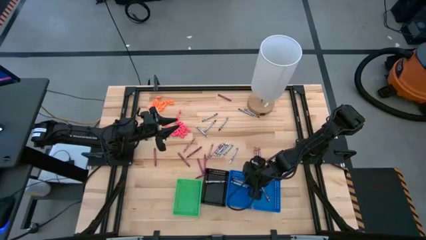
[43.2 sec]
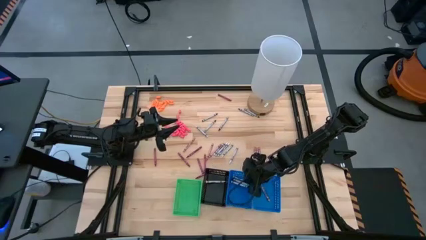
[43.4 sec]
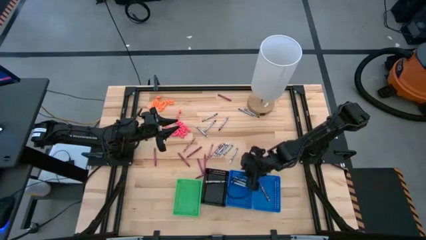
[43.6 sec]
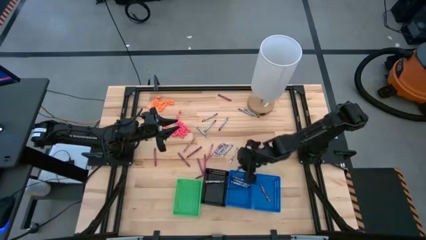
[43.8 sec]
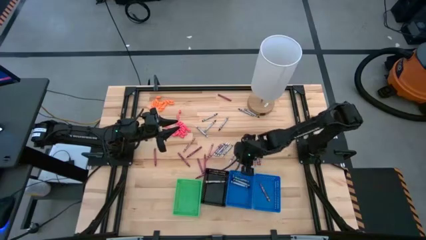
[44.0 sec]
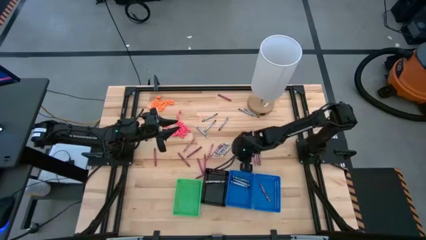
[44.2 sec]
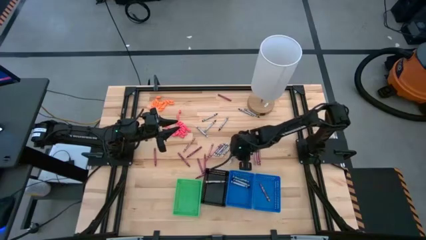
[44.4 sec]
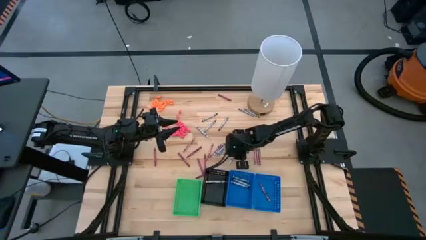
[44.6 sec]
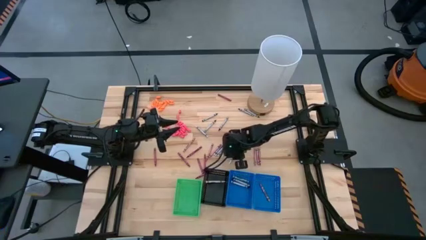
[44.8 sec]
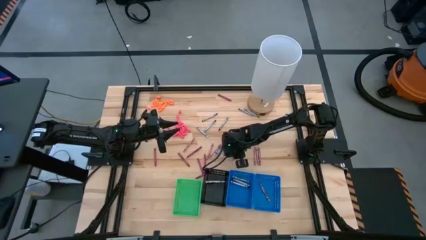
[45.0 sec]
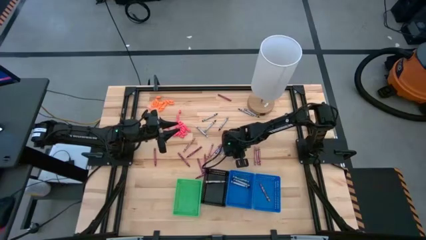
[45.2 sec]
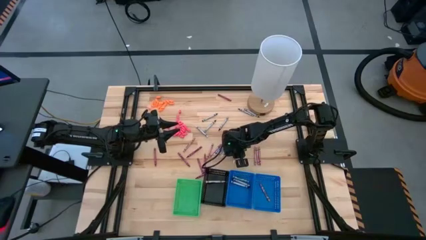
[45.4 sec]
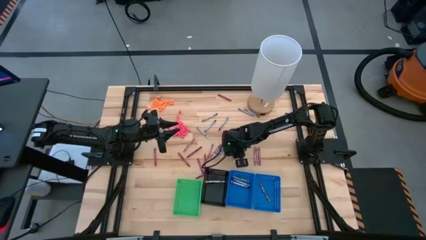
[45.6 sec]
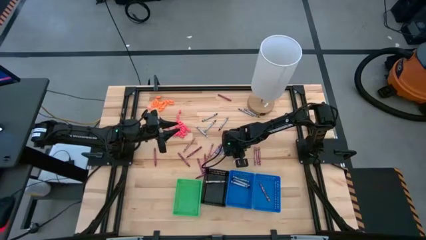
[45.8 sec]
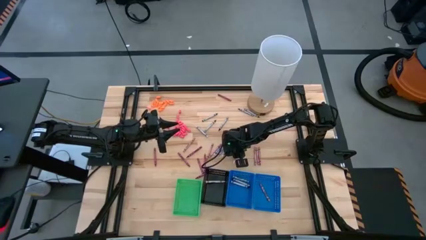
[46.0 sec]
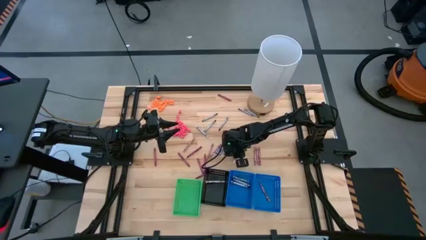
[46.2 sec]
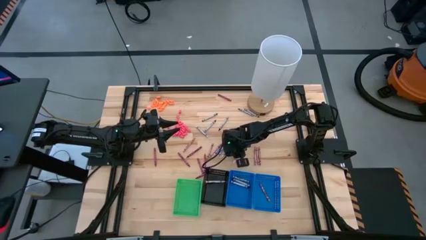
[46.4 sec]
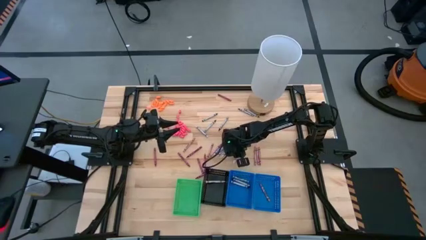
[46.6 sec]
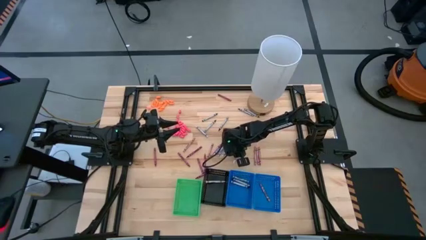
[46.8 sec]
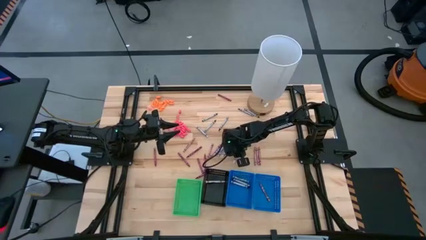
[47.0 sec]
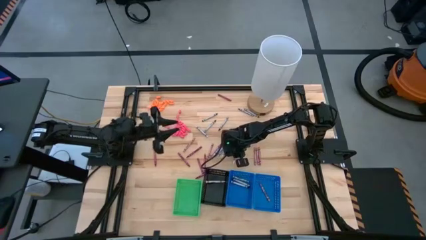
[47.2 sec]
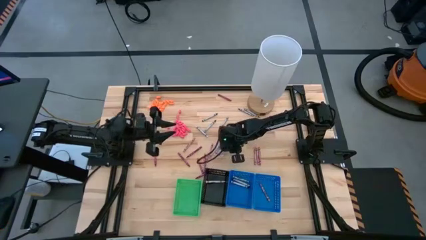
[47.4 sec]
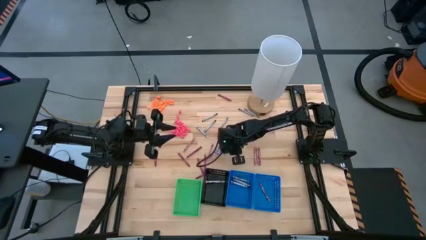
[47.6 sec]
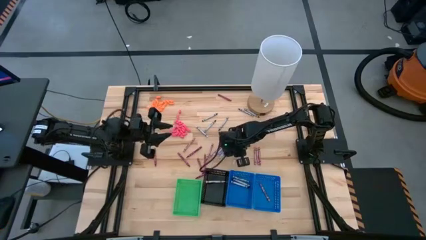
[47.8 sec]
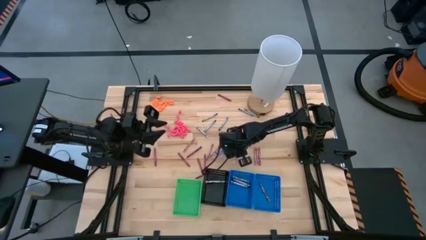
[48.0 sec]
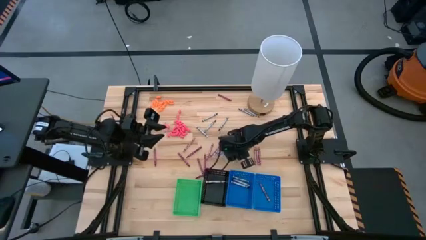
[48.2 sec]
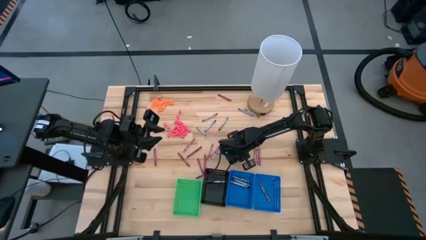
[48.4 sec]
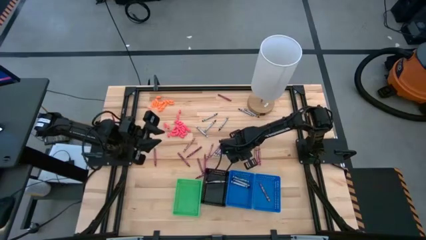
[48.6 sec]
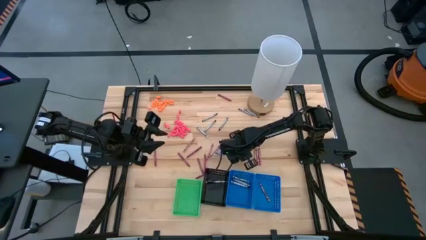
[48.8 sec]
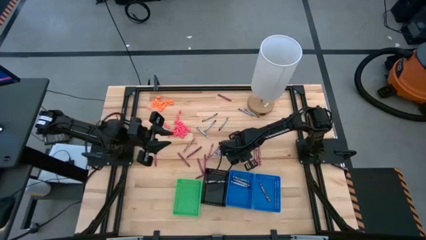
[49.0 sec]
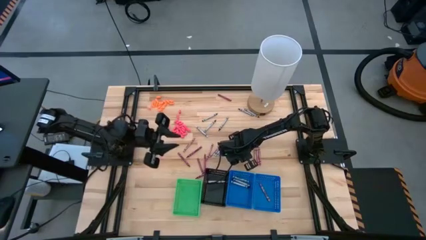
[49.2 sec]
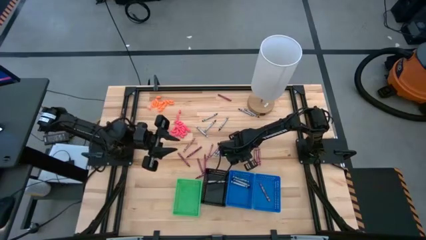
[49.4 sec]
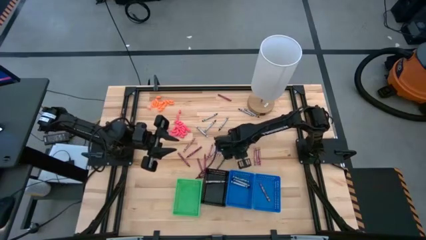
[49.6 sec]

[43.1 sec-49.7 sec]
Task: Sort crayons
Put the white crayon into the black bin

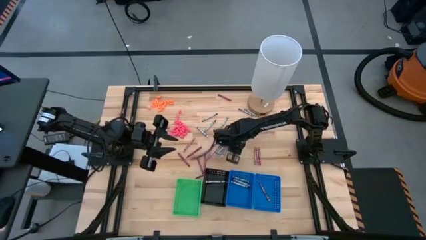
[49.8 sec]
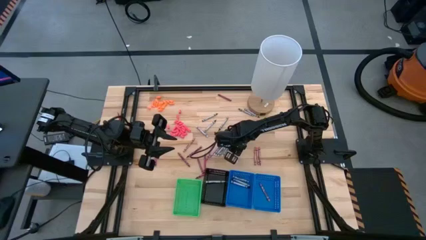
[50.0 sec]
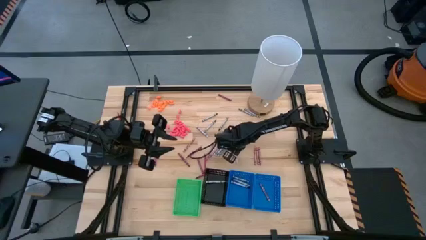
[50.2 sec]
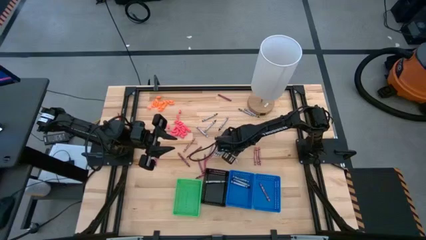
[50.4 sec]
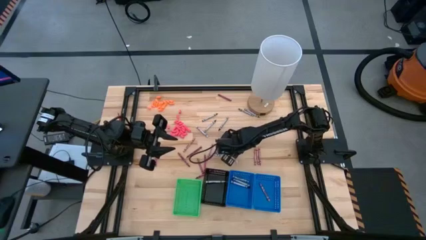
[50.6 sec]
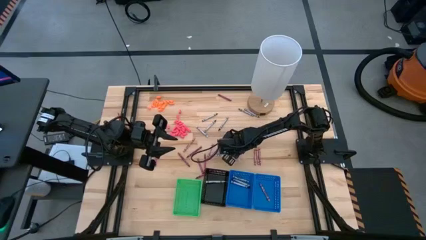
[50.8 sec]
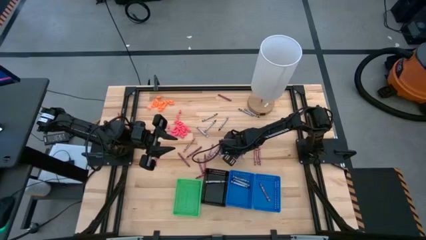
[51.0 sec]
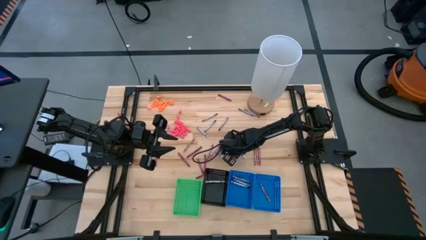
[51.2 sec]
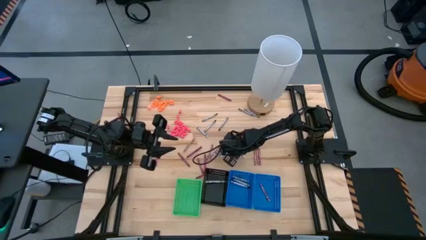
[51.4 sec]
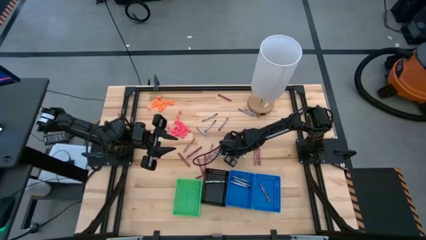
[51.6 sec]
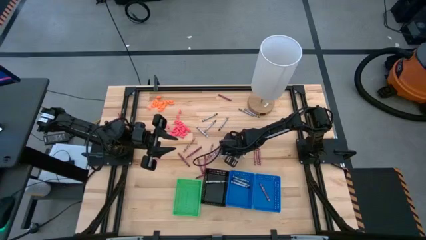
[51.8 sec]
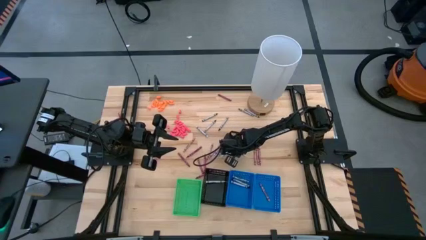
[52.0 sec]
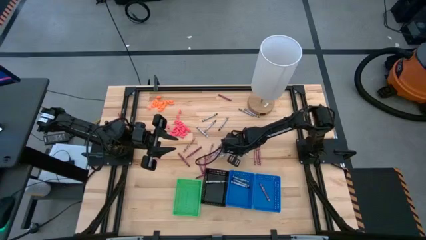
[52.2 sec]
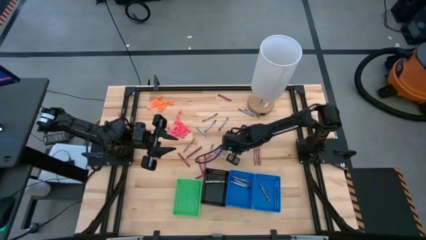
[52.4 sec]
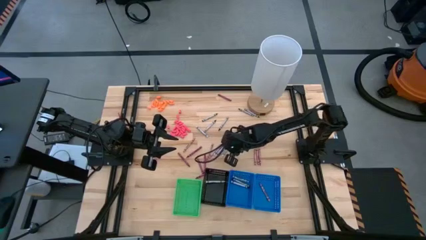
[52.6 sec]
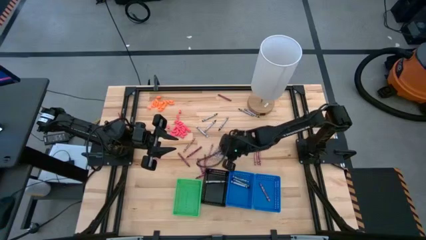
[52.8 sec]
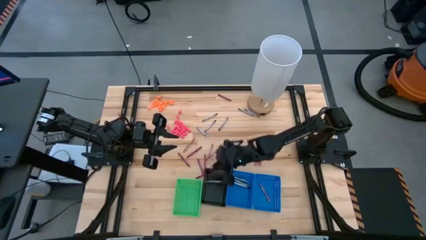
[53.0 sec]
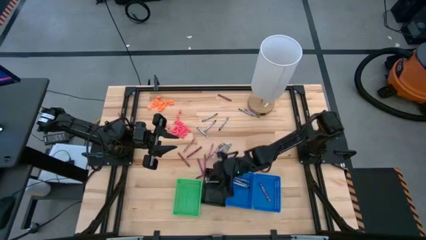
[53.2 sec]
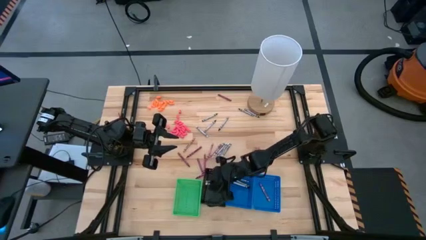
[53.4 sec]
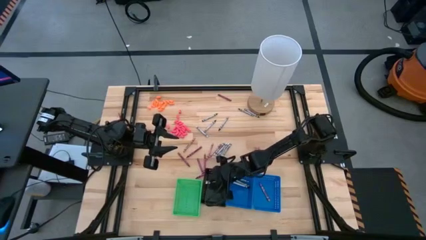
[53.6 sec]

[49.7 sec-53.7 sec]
Put the white crayon into the black bin
